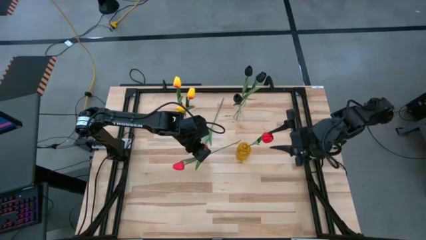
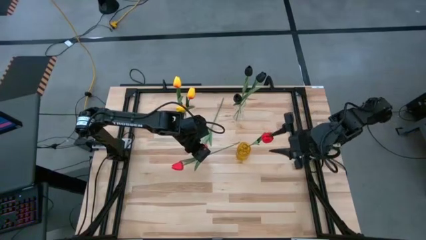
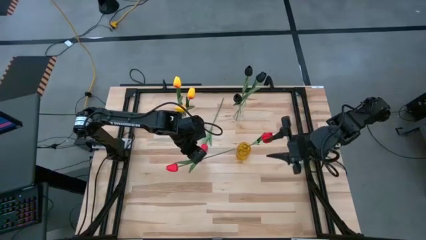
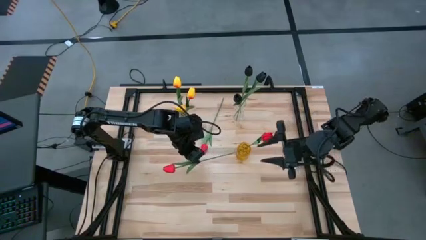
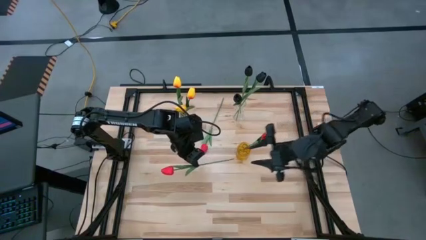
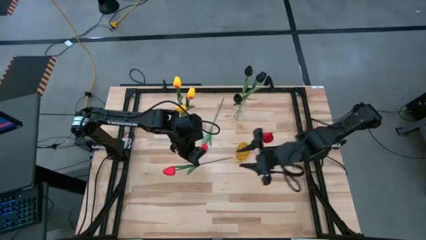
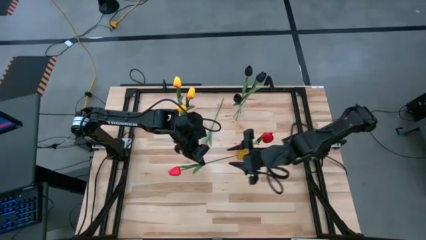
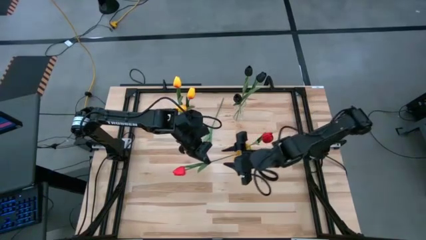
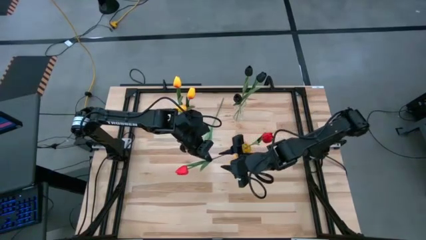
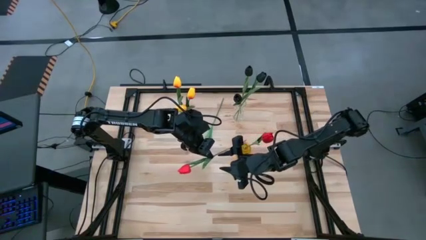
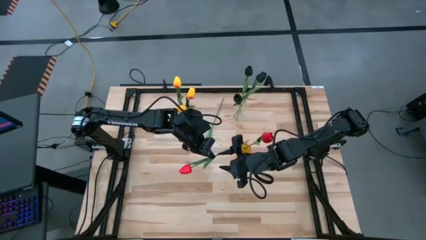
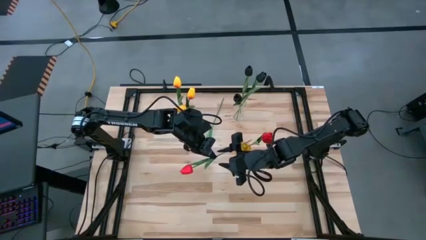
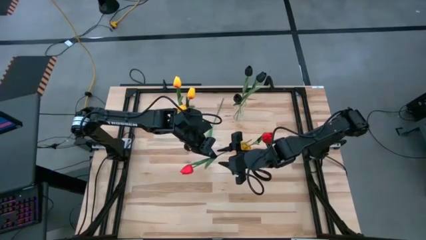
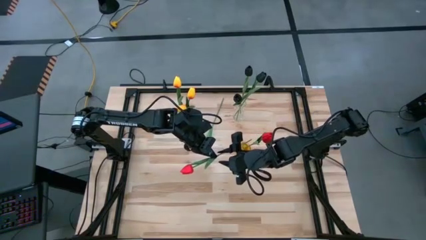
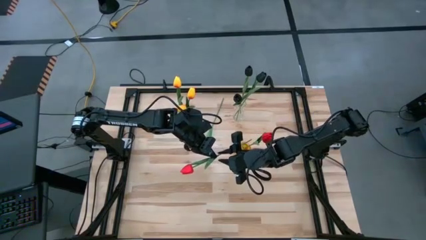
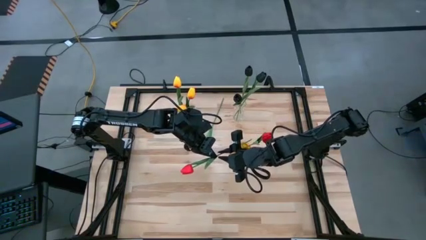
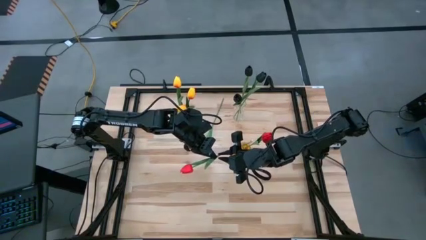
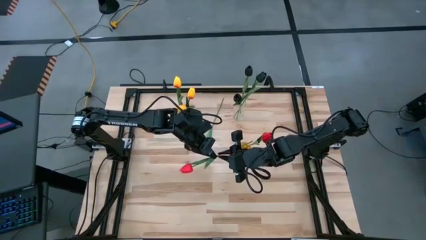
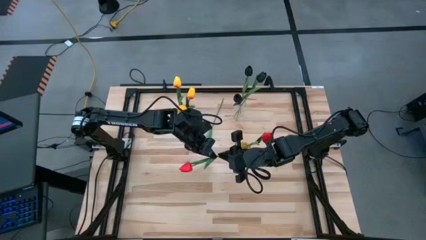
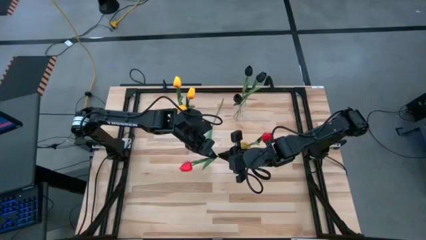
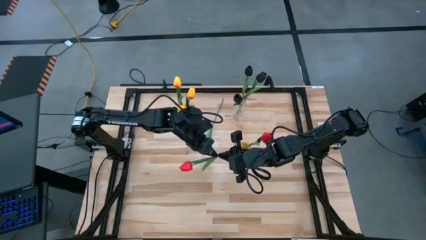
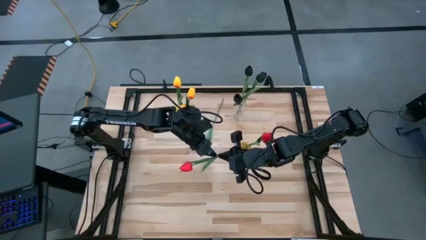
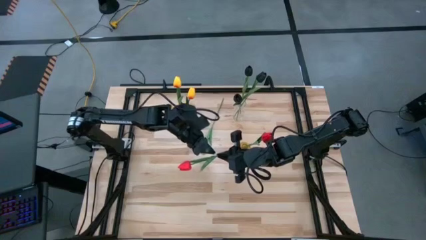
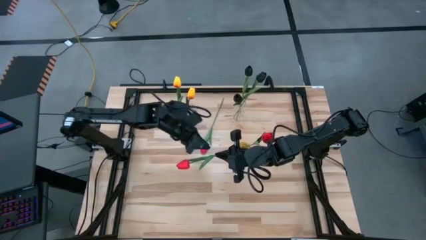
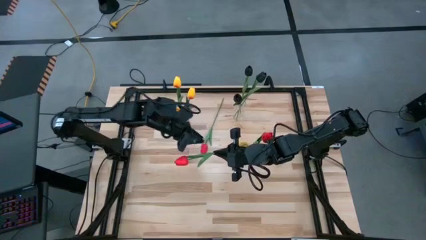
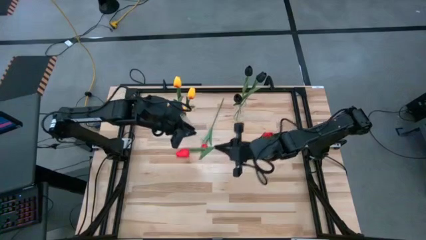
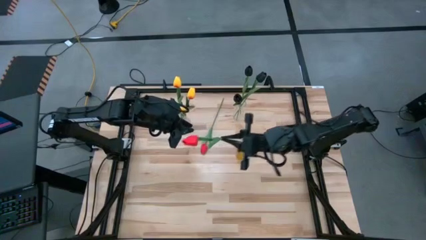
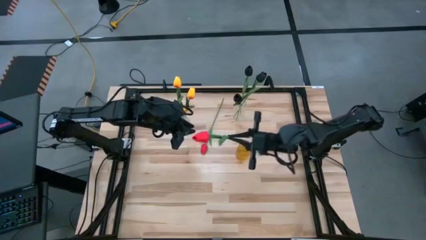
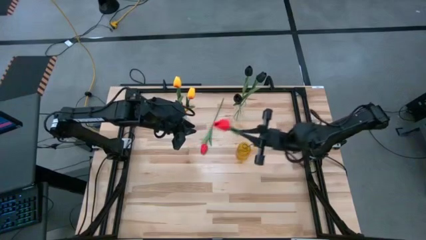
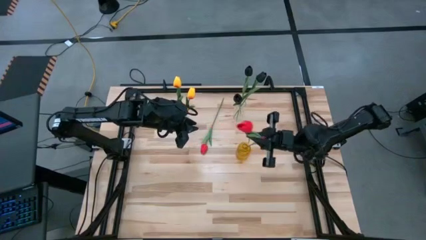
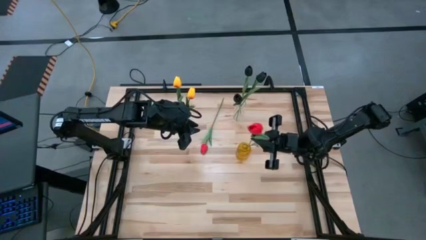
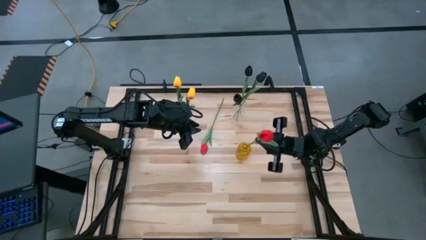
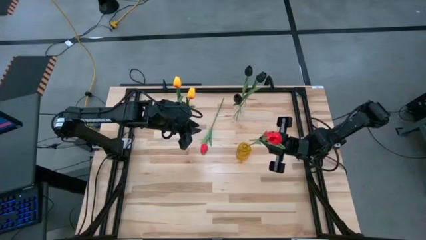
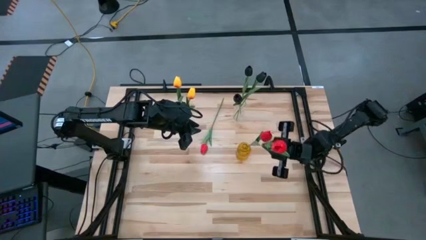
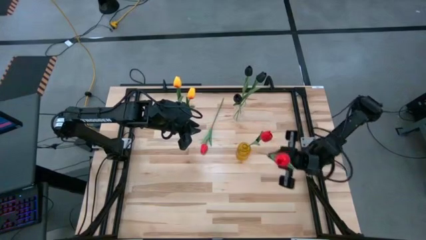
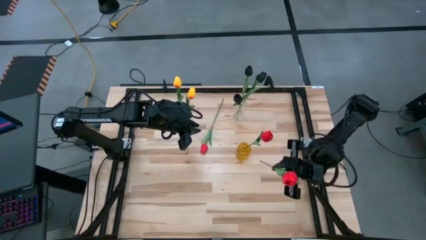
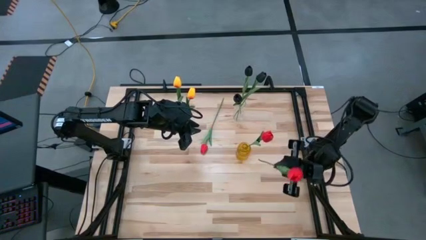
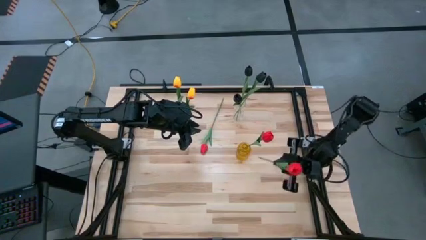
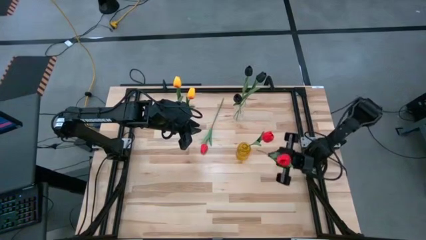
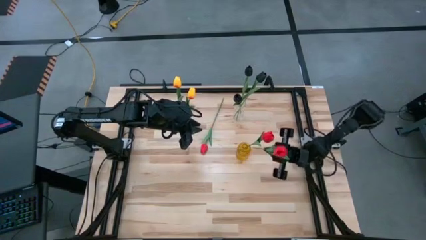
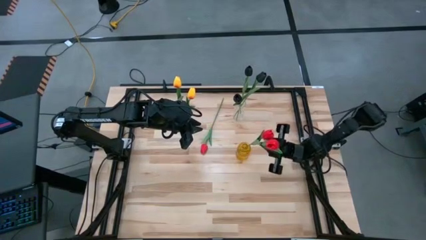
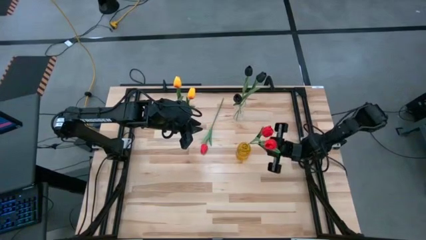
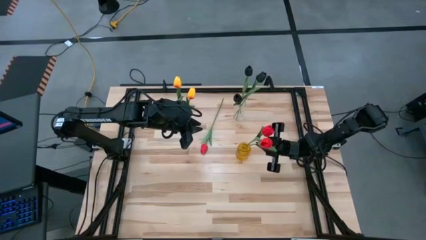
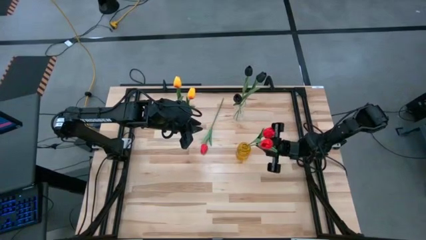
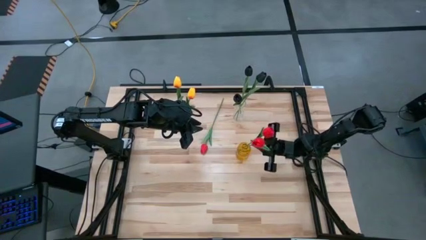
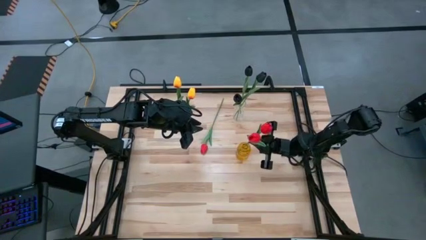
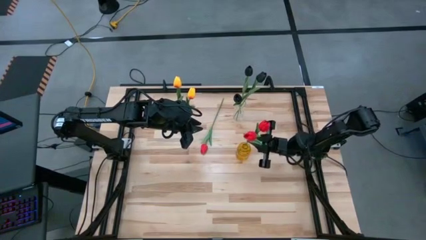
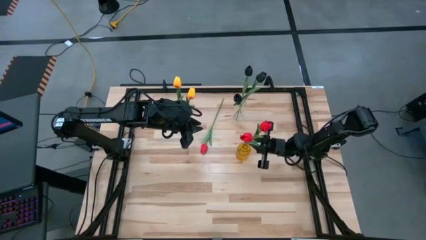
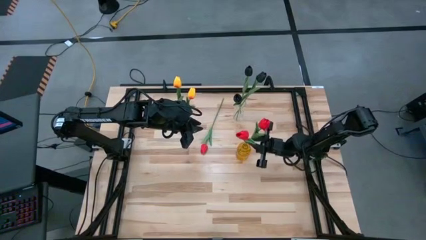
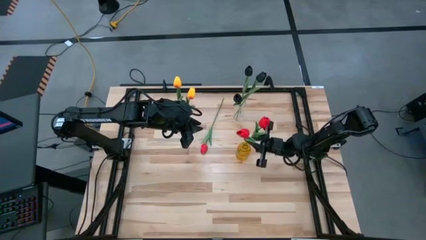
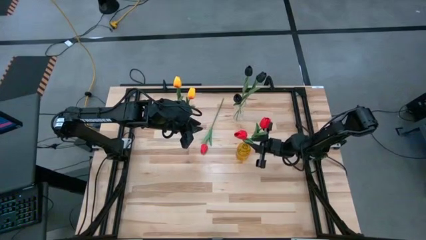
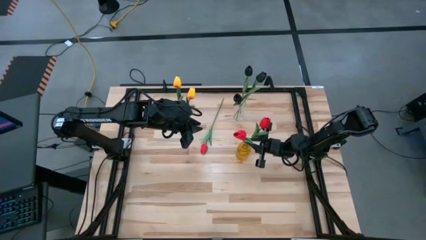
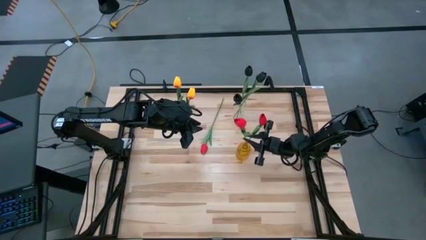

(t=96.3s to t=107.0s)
Task: Sort flowers into vase by color
Put the right red tulip into the yellow vase

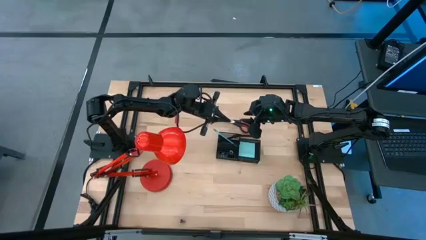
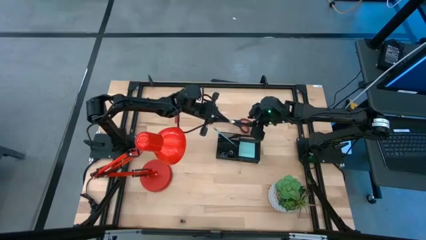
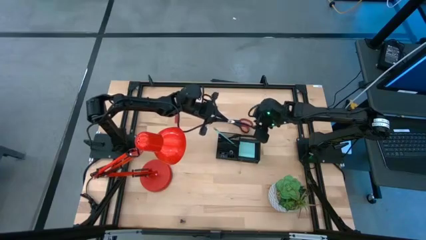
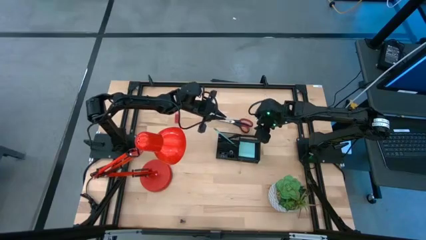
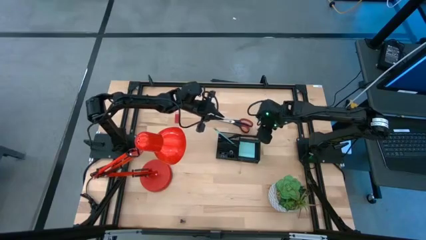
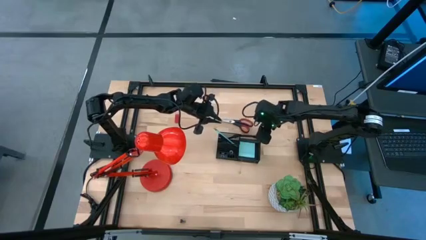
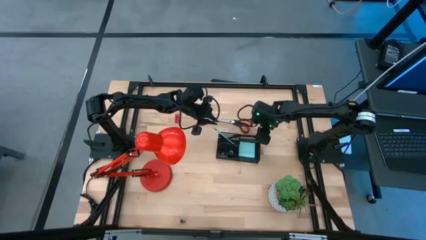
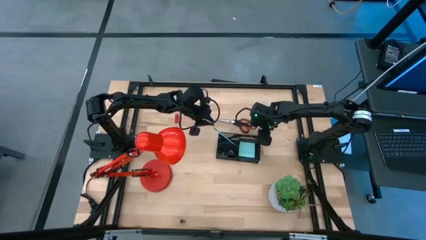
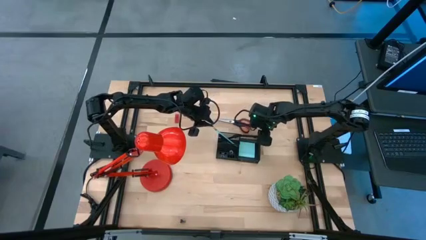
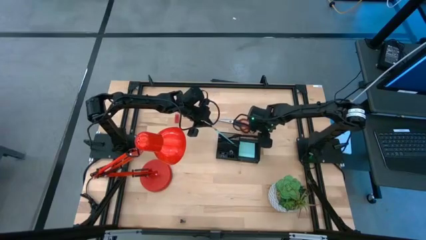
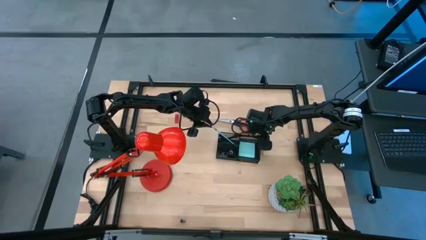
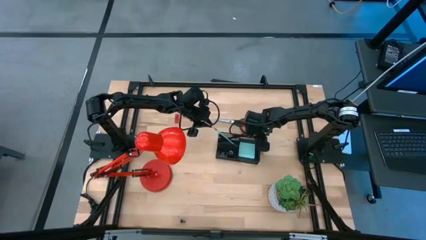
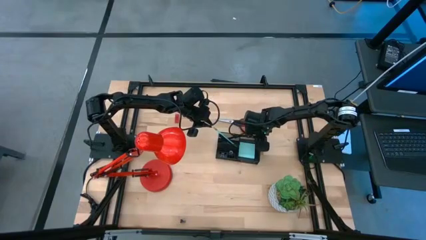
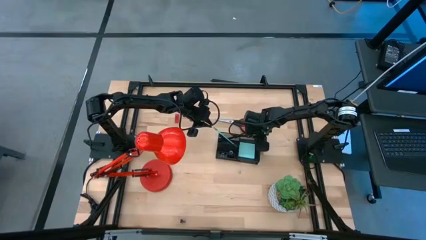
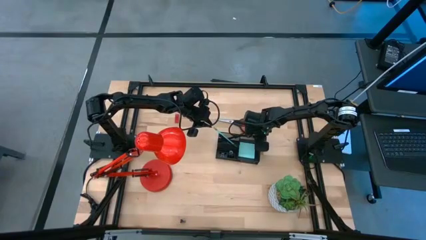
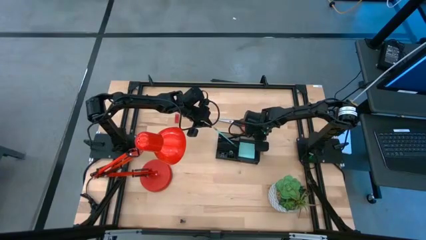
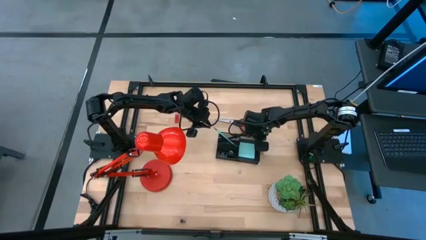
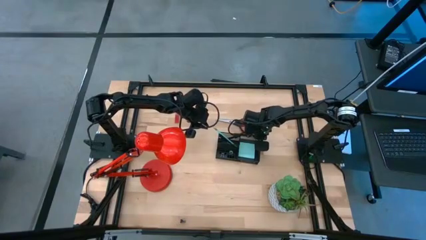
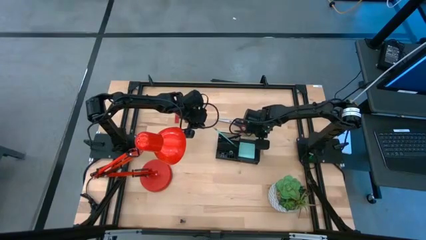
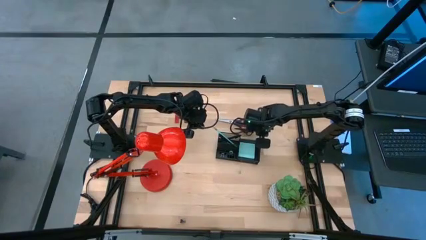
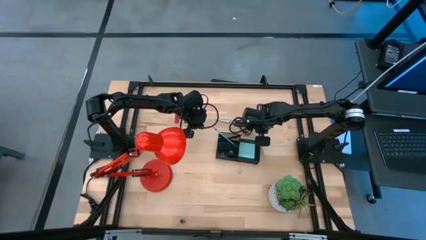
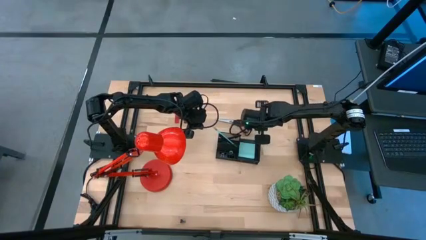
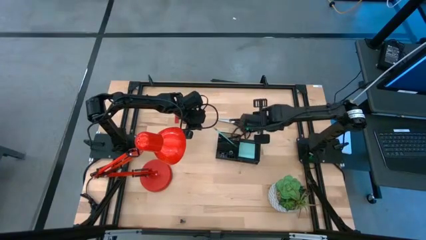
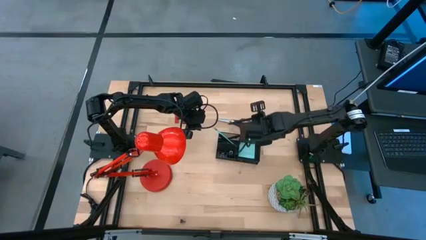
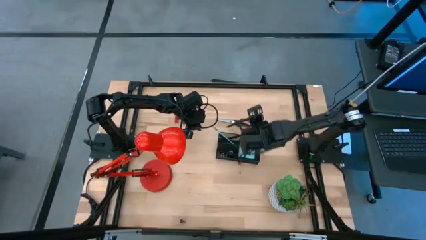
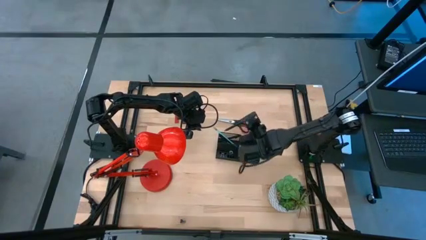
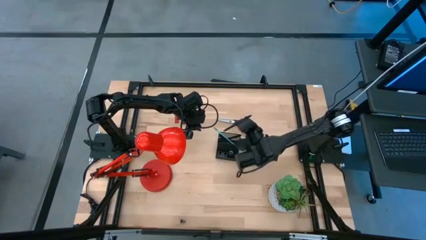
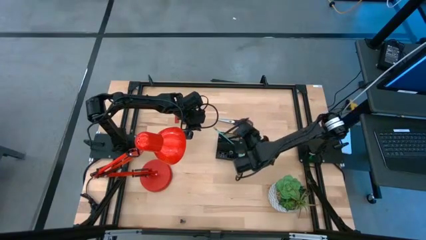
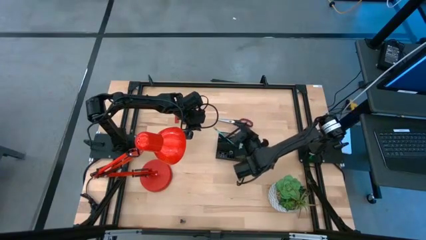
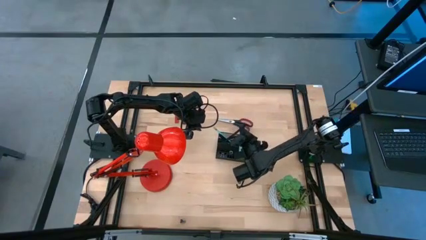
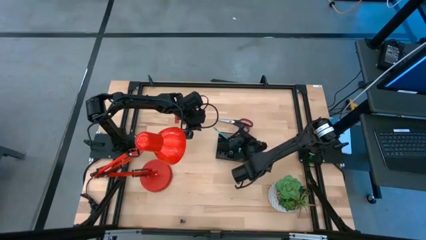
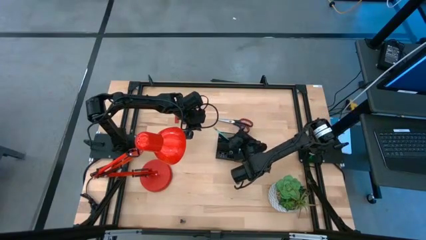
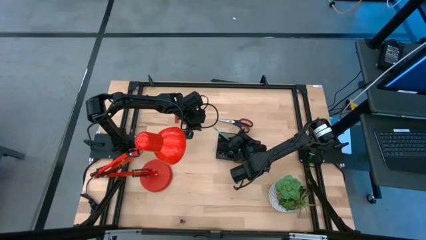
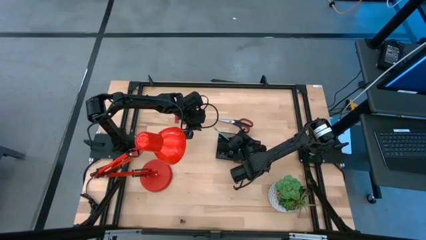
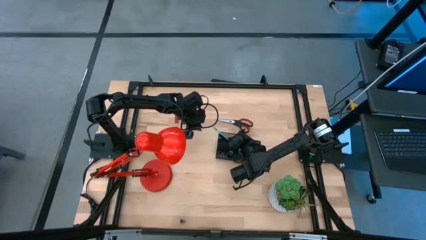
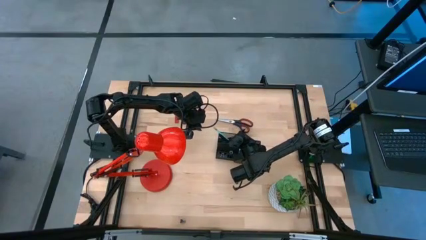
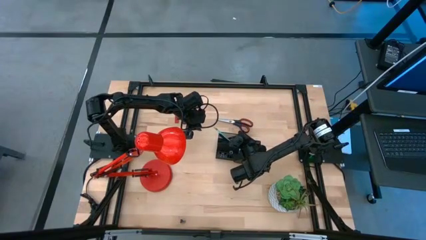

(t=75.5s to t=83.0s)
Task: Pick and place office supplies into organizer
Put the black pen into the black desk organizer
